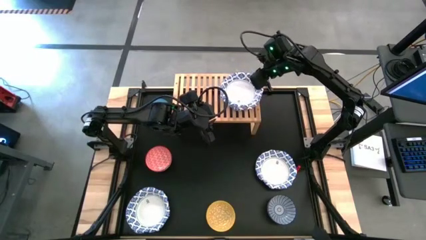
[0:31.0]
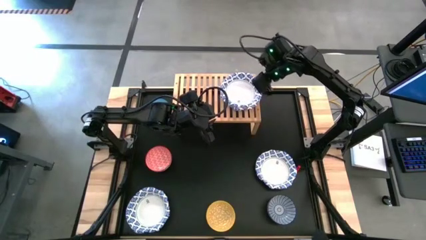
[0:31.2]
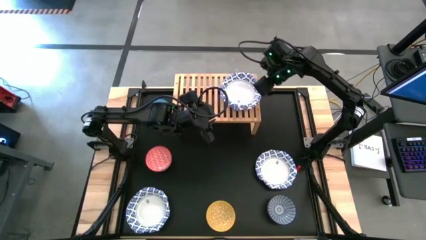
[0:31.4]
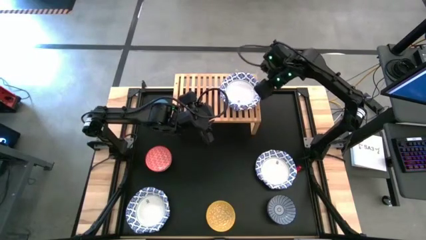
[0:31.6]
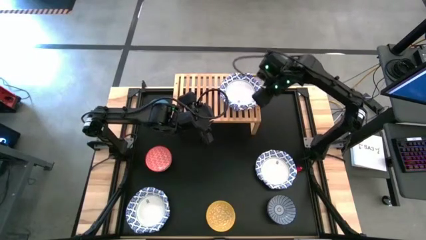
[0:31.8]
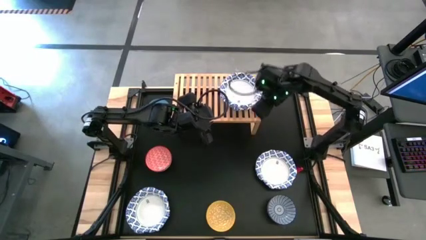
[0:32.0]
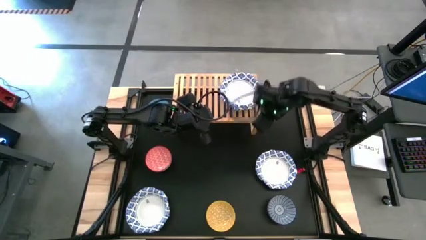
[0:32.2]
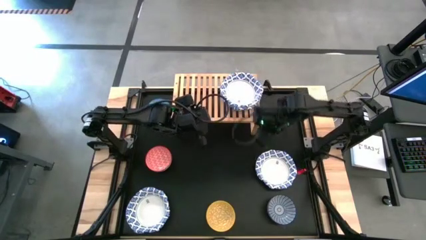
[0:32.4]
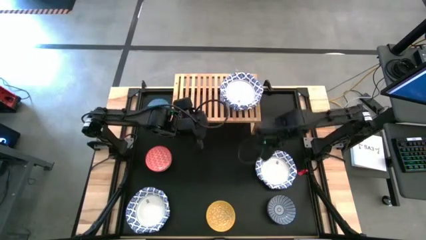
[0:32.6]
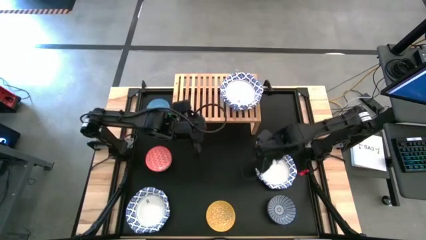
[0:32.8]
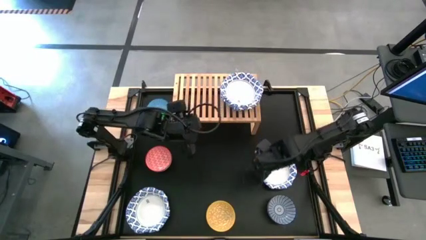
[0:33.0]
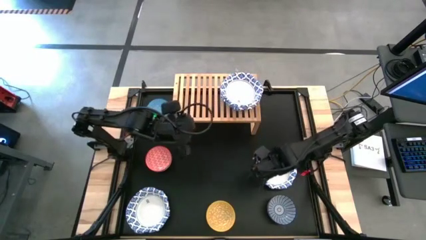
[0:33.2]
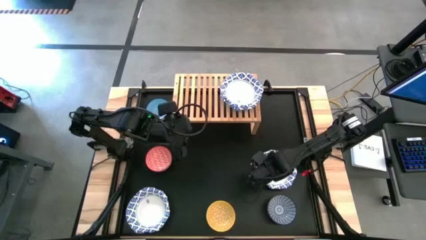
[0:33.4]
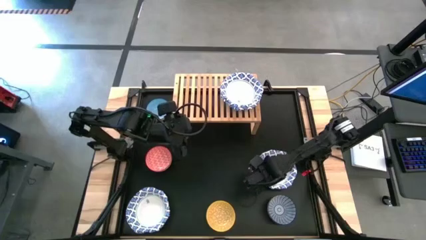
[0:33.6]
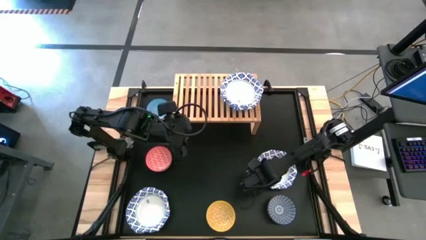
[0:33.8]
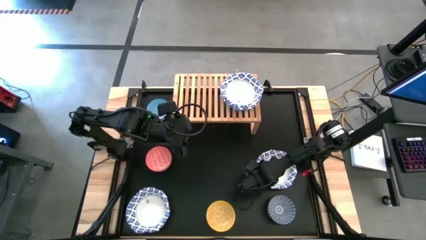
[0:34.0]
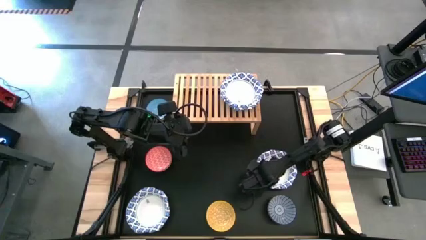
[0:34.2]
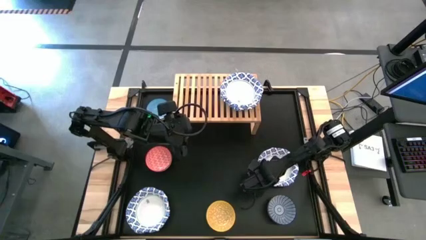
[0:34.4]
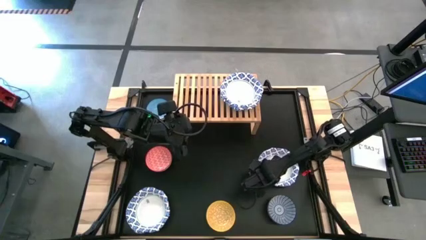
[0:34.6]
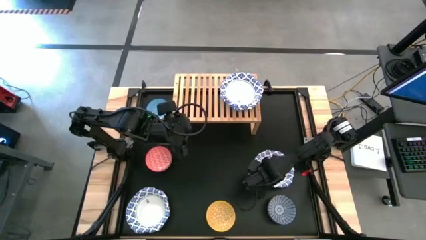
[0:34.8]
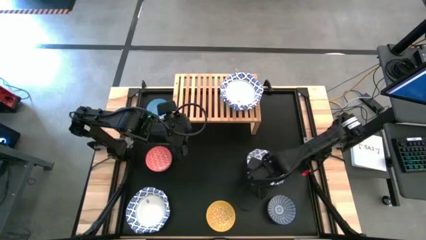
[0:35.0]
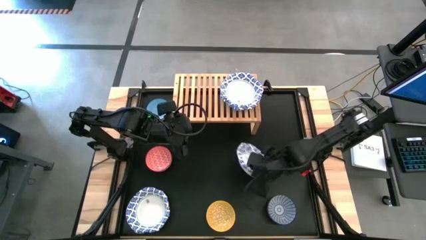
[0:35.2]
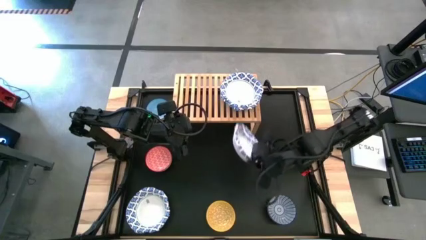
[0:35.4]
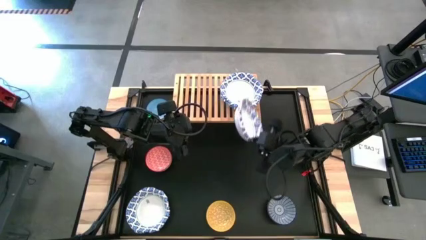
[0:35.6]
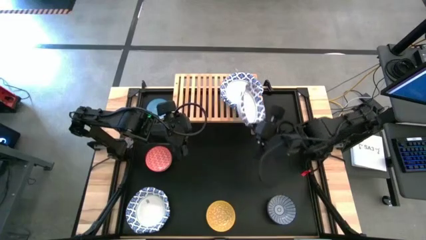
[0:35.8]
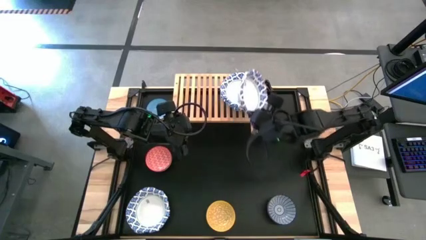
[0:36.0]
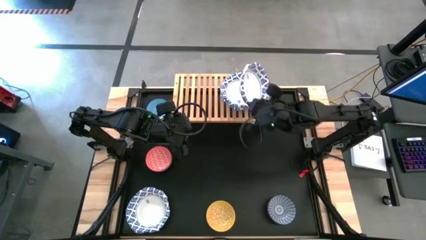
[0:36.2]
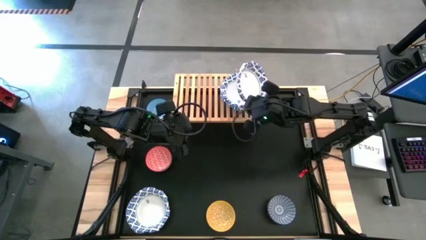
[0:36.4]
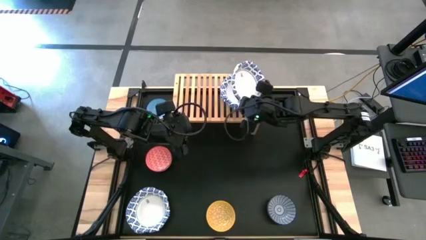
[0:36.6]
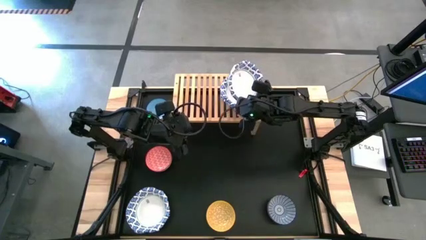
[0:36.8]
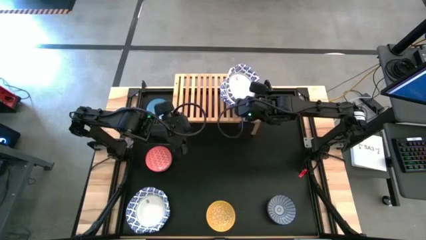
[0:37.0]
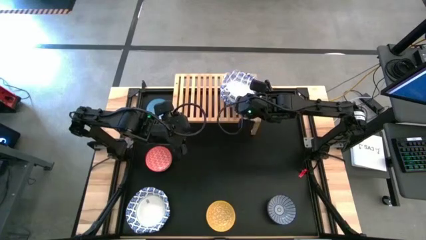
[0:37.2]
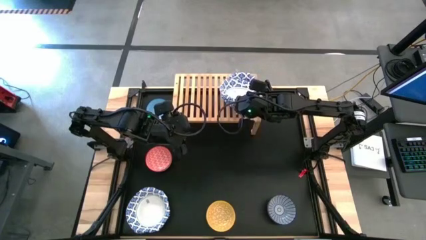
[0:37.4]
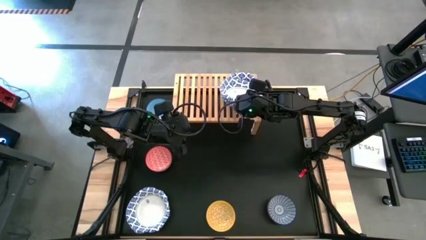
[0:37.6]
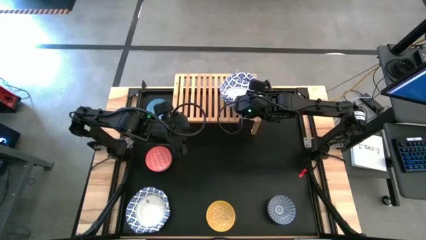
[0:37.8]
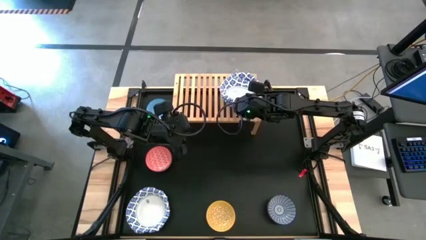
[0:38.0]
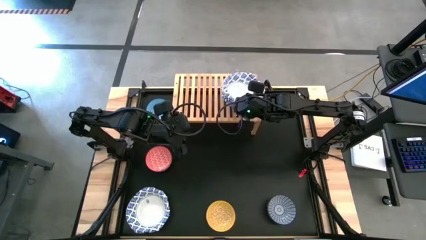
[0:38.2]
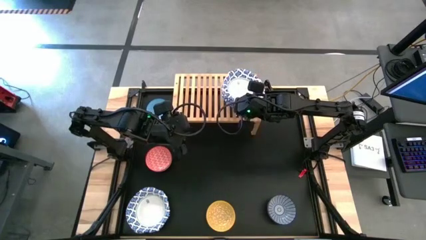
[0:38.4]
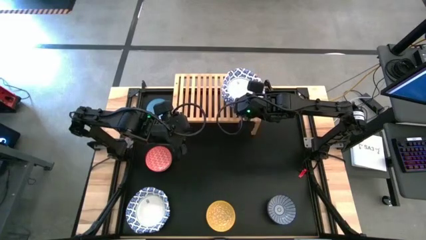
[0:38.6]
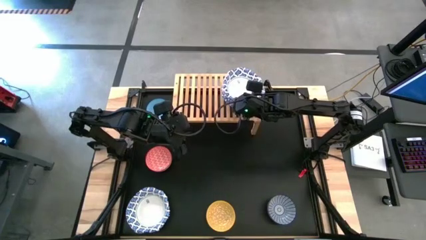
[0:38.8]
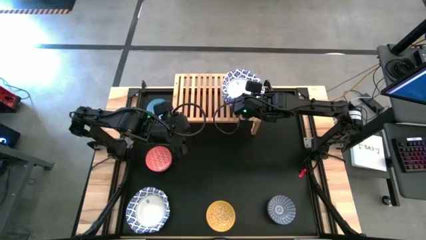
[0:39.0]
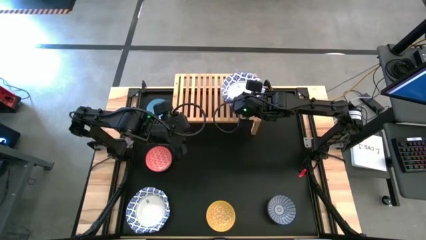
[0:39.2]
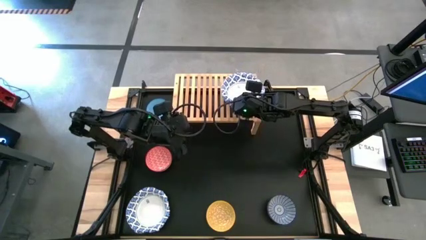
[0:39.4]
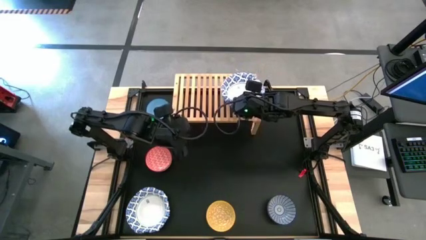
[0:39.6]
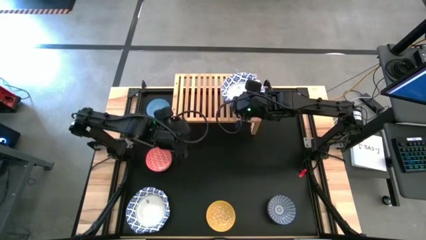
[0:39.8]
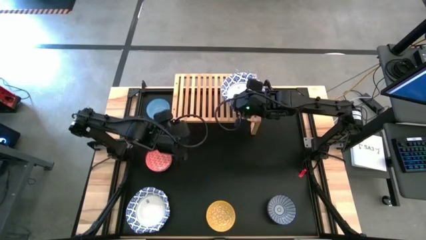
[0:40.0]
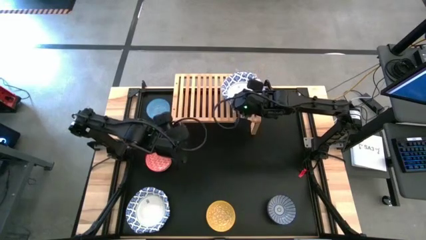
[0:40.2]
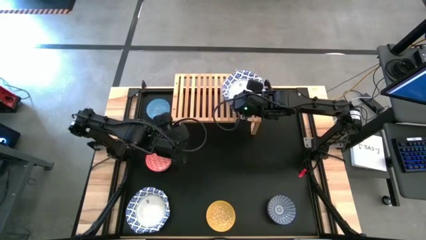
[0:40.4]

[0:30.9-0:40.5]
Task: Place and stack bowls onto a shelf
Stack the white patterned bowl on top of the other white patterned bowl on the shelf

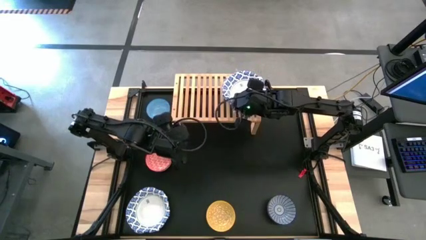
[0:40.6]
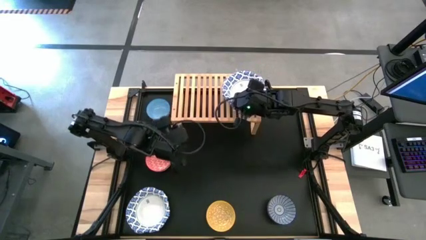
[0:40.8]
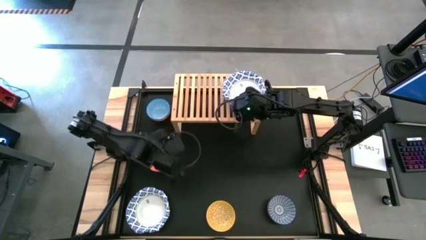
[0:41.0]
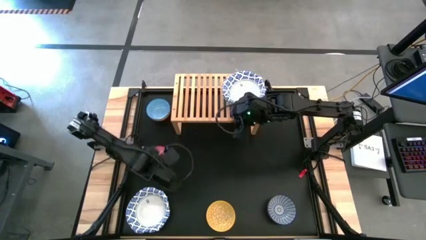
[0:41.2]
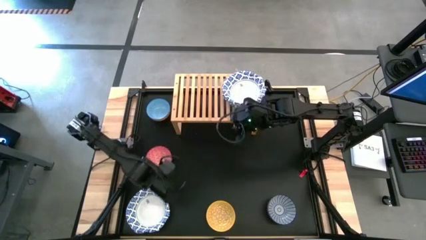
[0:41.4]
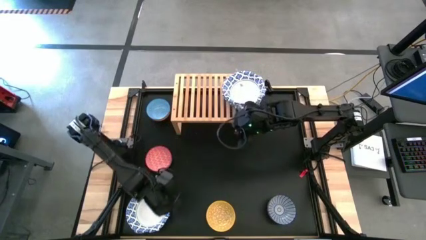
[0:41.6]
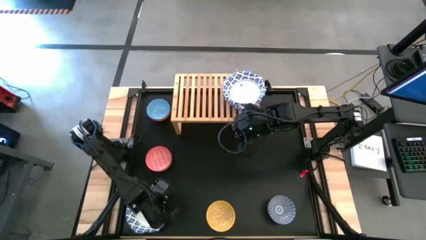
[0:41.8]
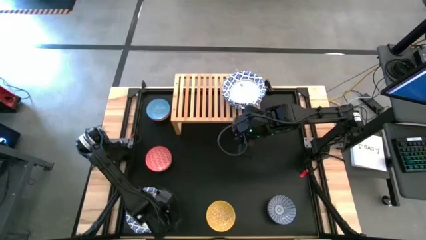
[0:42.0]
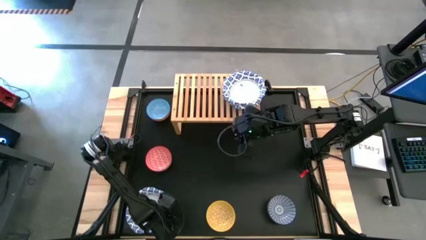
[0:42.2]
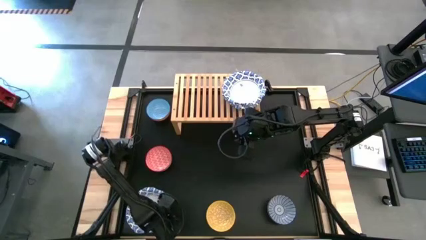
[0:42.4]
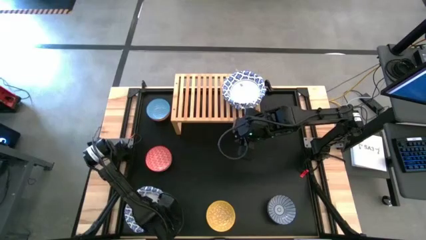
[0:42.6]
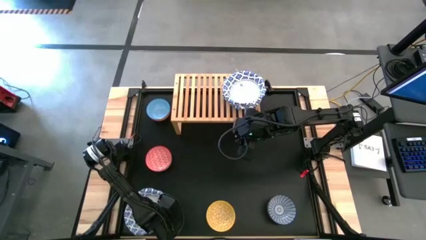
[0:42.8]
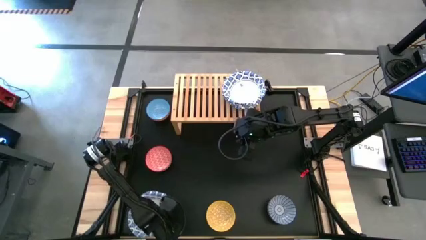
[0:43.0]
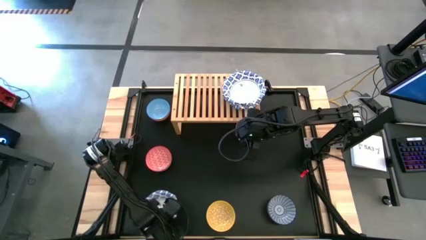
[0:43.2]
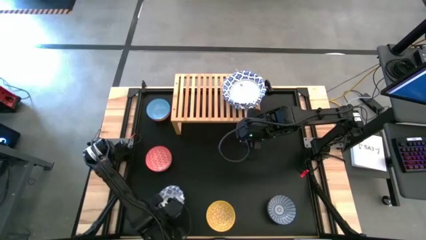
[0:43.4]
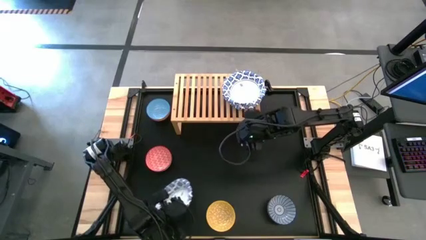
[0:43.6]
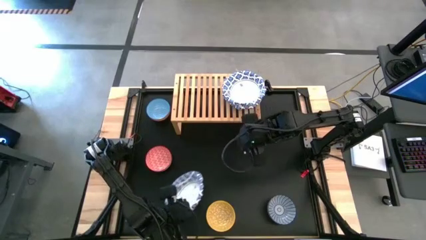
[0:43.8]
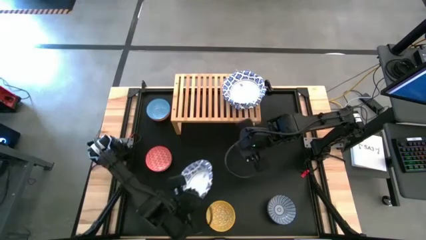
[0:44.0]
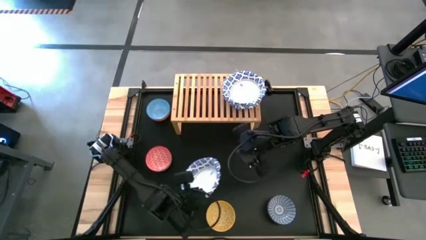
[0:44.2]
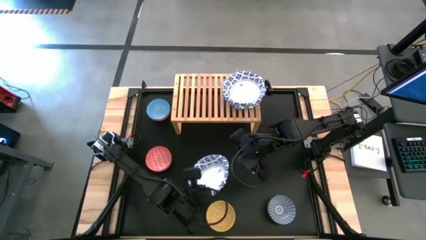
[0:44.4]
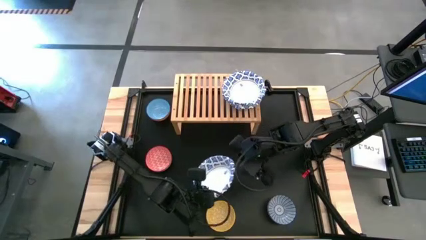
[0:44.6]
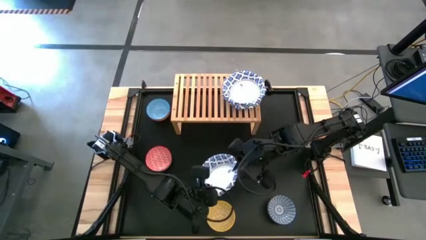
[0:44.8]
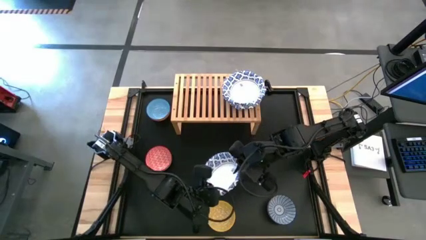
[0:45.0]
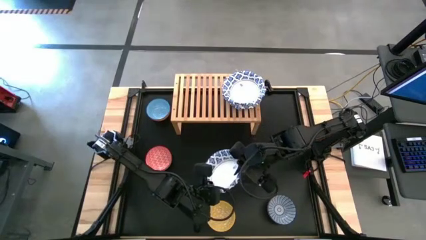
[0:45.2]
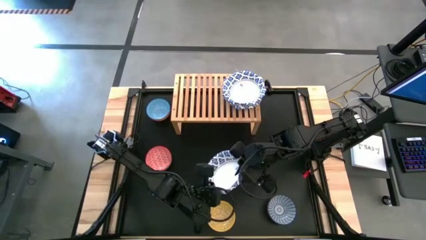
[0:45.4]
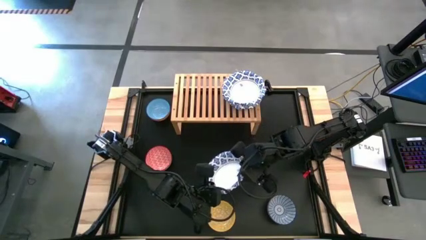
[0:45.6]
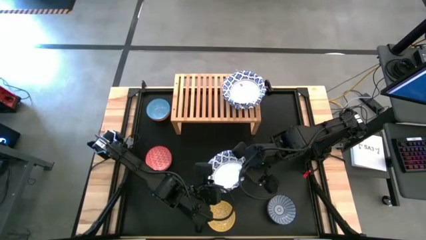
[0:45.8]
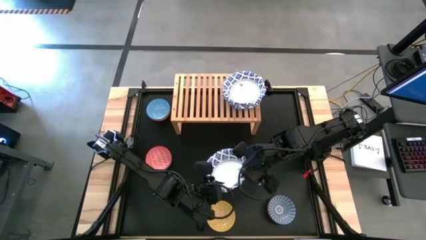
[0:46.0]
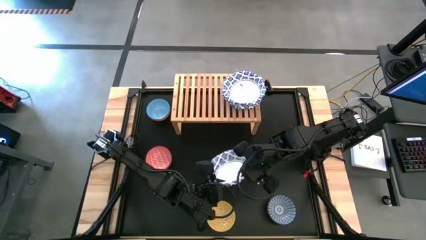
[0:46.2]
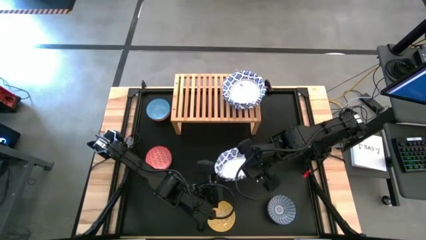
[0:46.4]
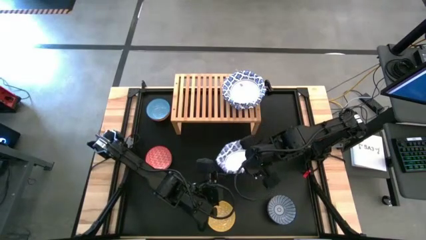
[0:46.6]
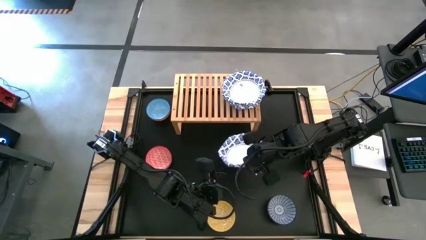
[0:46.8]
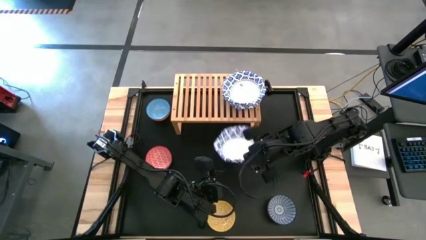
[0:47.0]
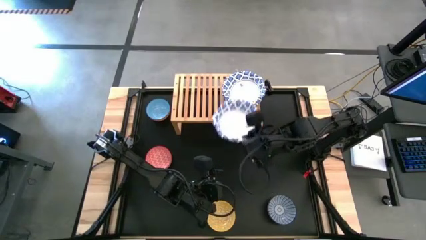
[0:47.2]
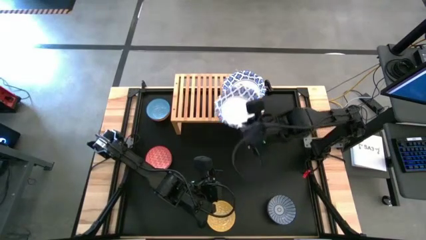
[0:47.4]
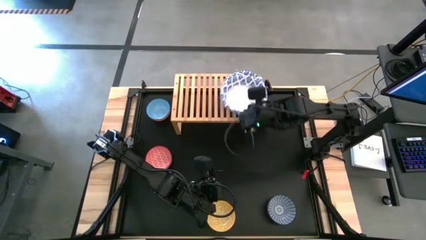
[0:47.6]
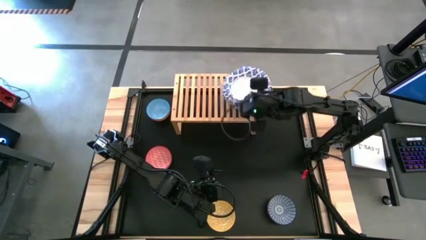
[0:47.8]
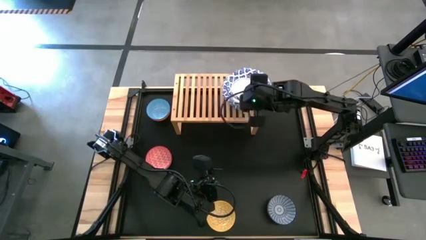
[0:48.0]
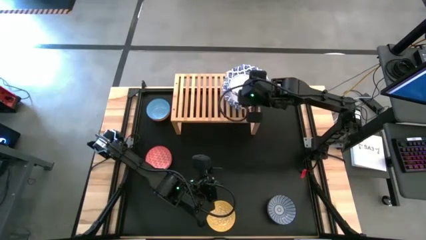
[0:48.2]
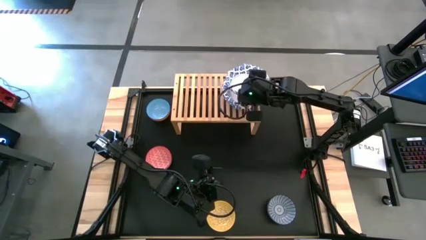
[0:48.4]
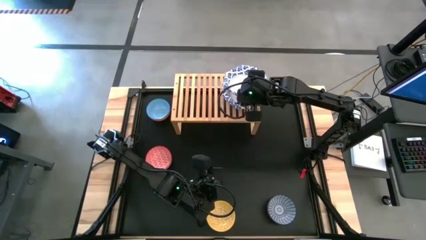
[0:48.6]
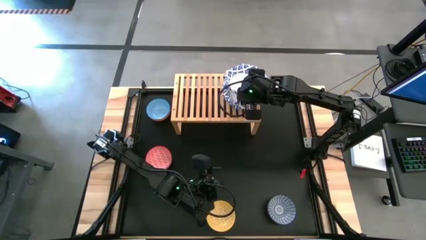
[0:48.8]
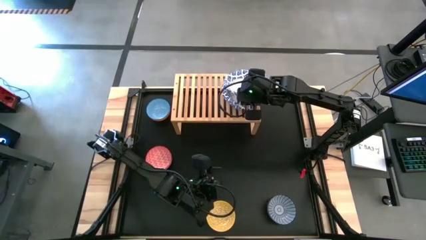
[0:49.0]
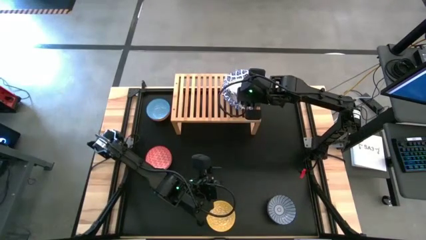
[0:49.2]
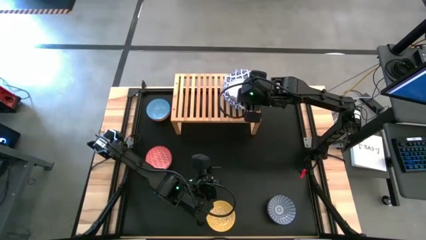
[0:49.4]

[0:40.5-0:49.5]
Stack the white patterned bowl on top of the other white patterned bowl on the shelf
